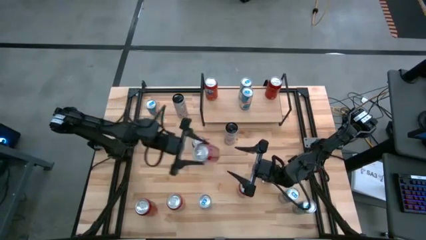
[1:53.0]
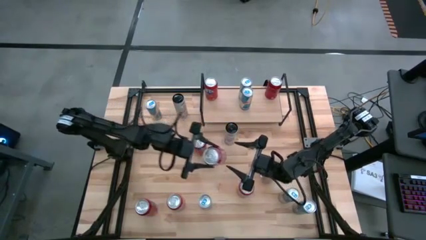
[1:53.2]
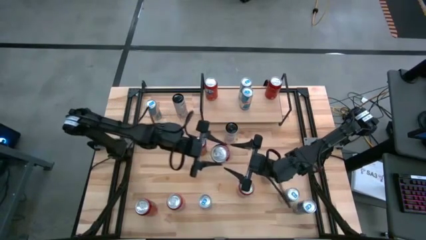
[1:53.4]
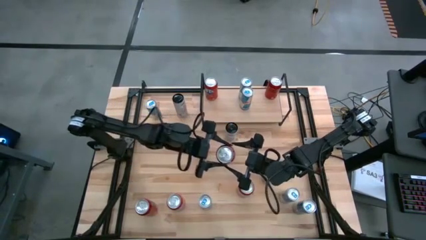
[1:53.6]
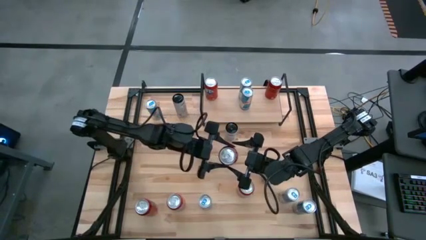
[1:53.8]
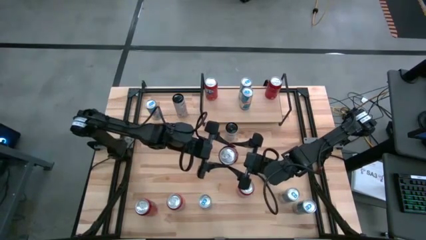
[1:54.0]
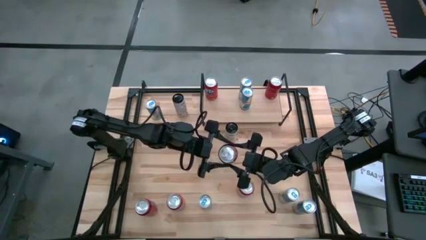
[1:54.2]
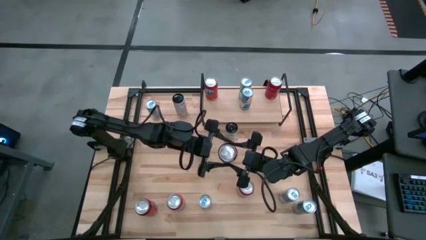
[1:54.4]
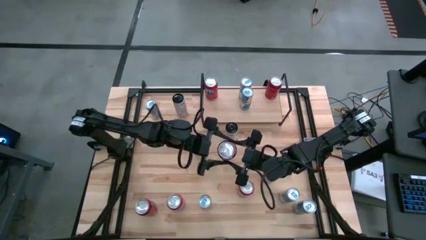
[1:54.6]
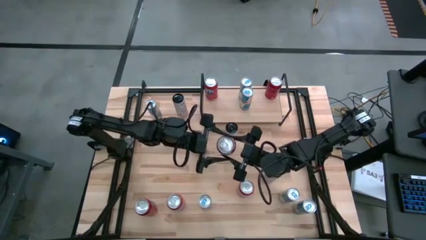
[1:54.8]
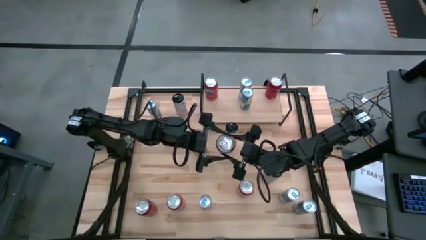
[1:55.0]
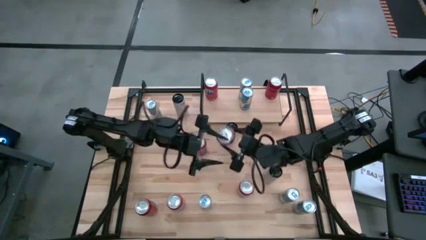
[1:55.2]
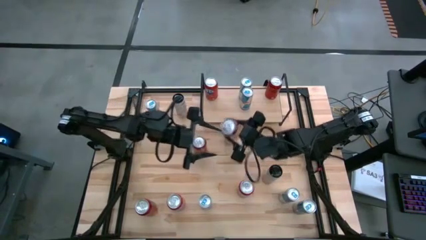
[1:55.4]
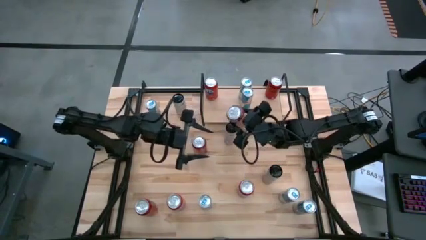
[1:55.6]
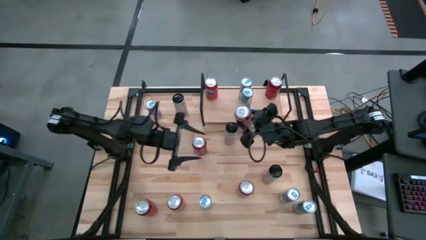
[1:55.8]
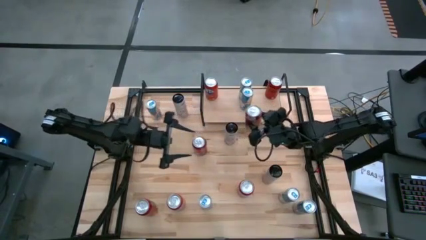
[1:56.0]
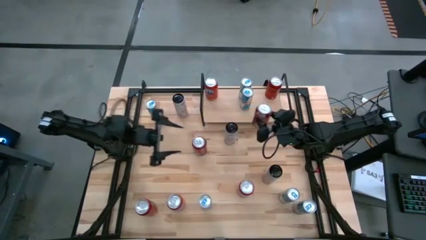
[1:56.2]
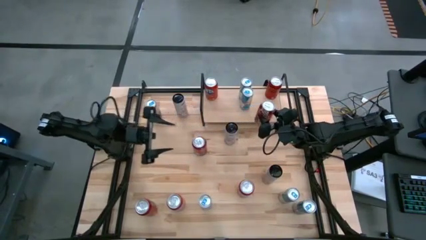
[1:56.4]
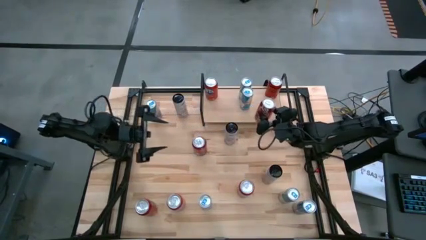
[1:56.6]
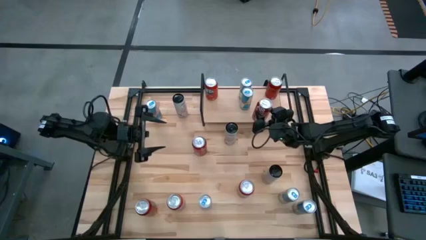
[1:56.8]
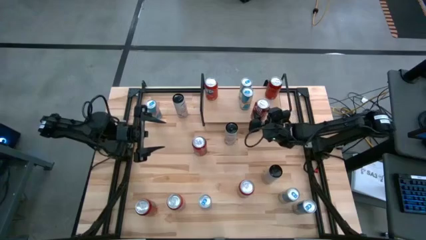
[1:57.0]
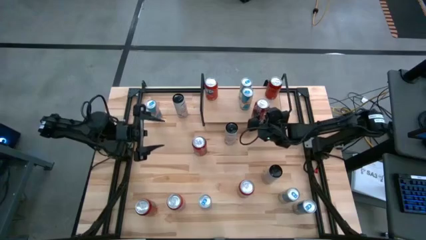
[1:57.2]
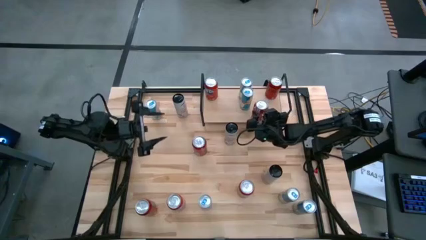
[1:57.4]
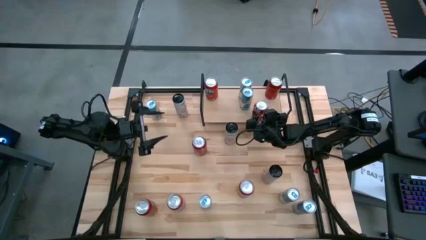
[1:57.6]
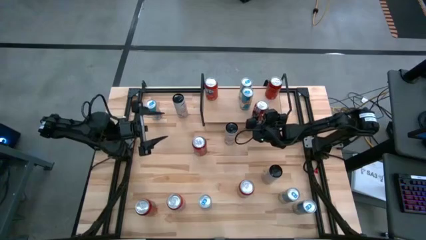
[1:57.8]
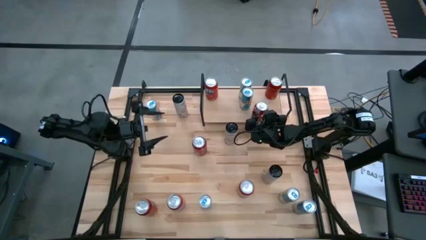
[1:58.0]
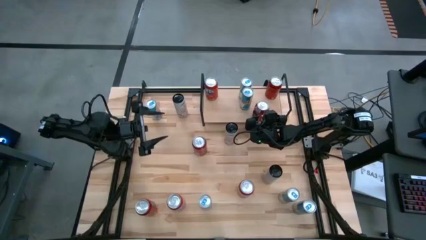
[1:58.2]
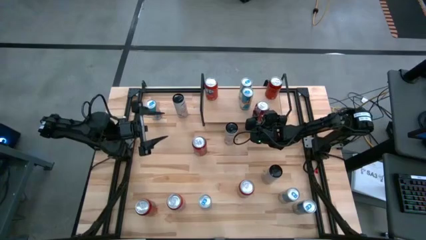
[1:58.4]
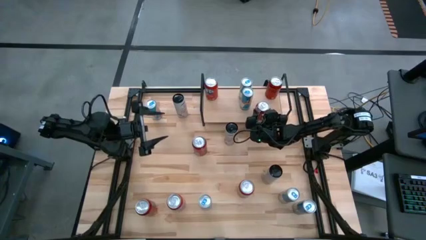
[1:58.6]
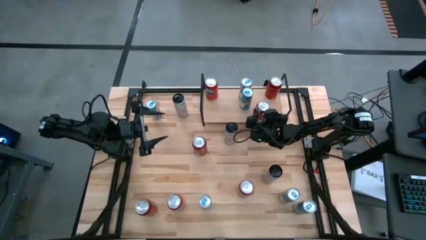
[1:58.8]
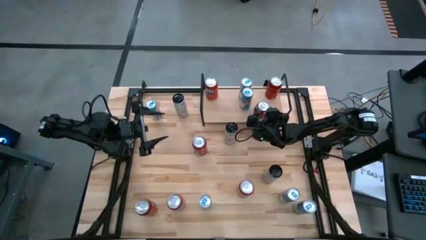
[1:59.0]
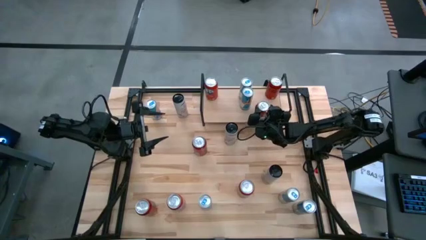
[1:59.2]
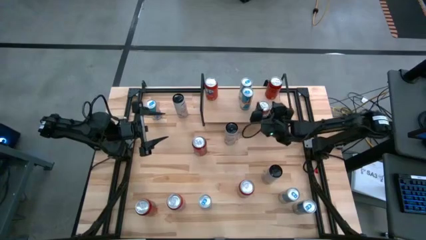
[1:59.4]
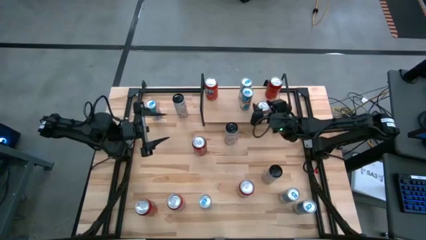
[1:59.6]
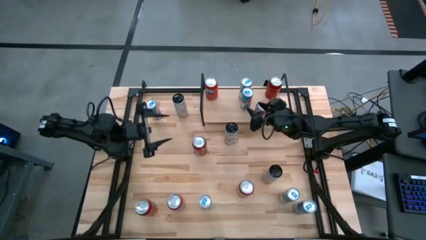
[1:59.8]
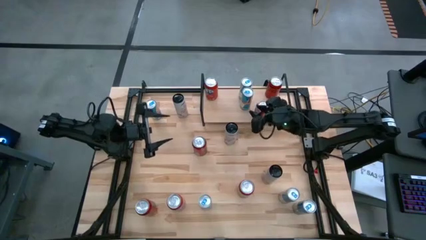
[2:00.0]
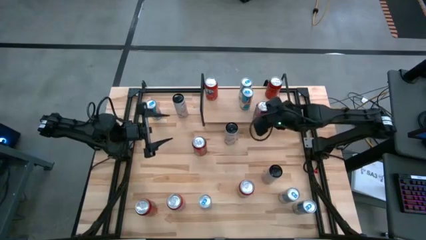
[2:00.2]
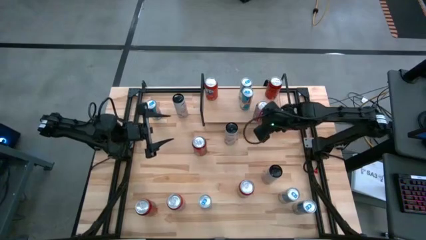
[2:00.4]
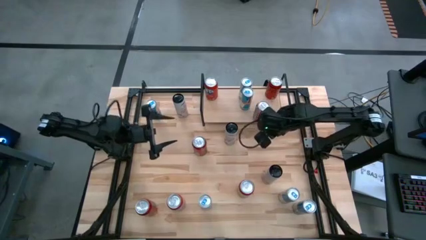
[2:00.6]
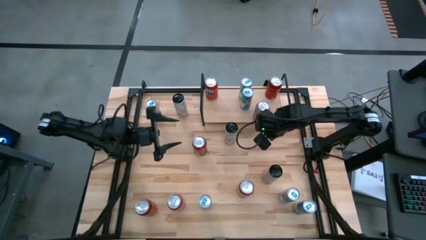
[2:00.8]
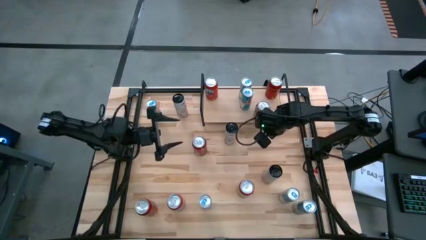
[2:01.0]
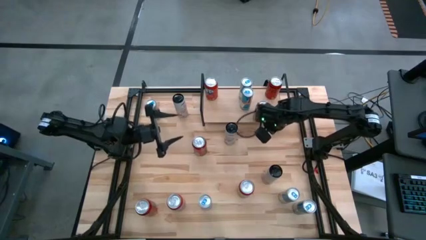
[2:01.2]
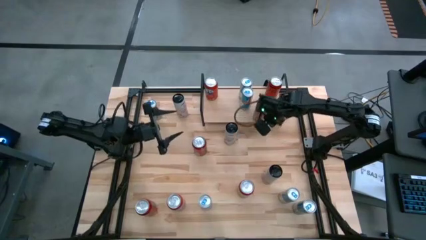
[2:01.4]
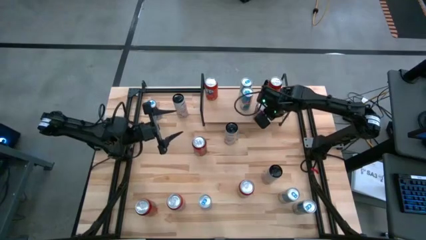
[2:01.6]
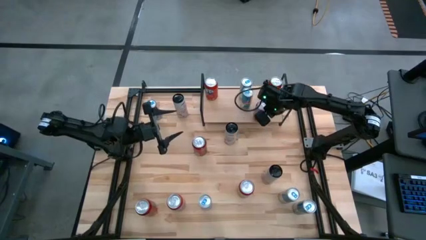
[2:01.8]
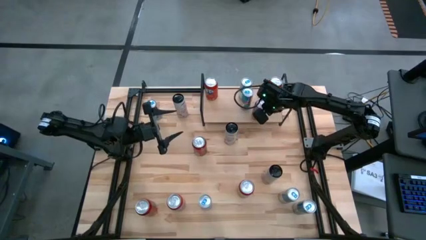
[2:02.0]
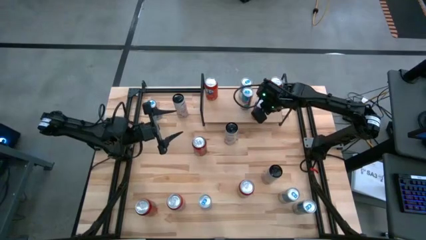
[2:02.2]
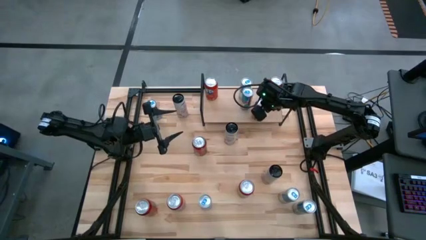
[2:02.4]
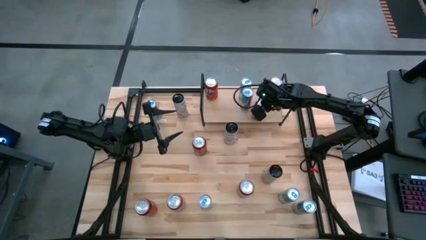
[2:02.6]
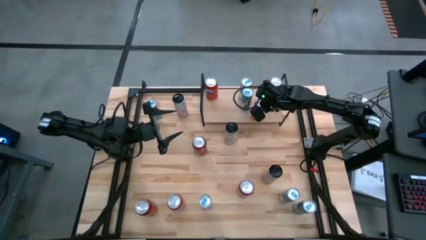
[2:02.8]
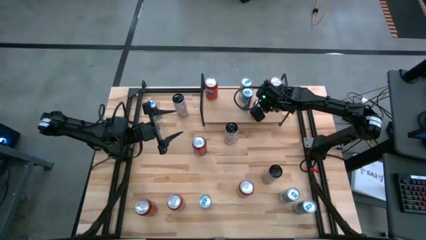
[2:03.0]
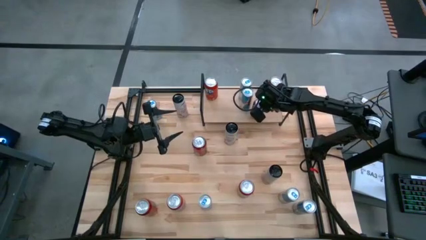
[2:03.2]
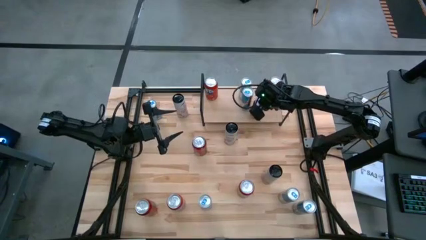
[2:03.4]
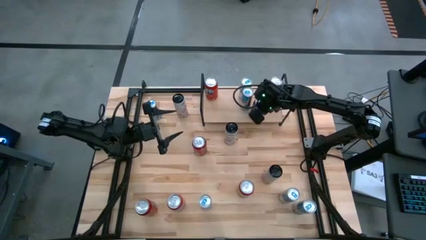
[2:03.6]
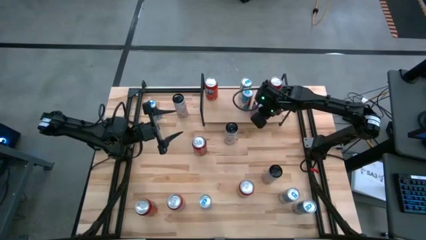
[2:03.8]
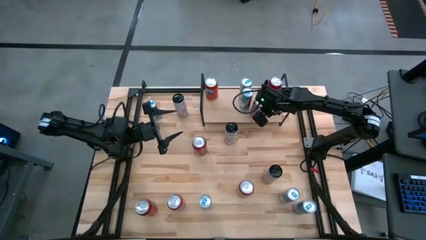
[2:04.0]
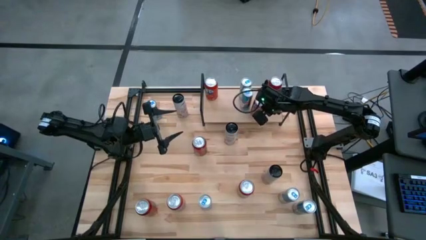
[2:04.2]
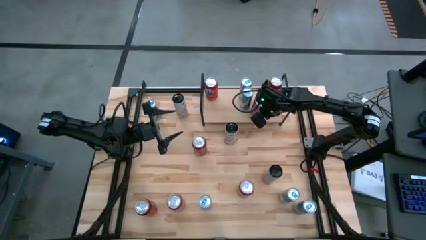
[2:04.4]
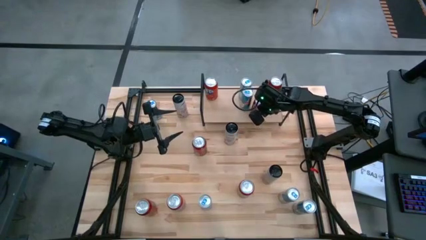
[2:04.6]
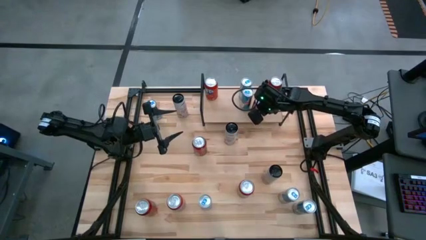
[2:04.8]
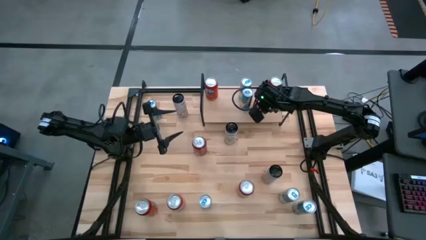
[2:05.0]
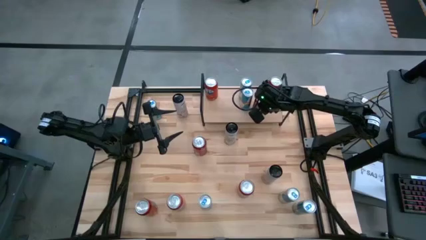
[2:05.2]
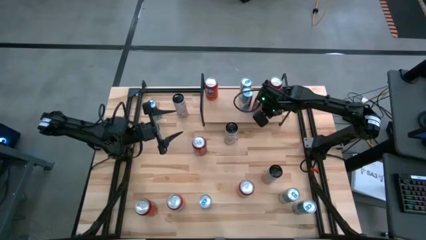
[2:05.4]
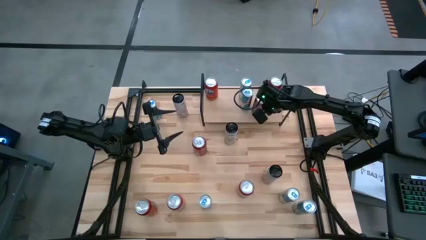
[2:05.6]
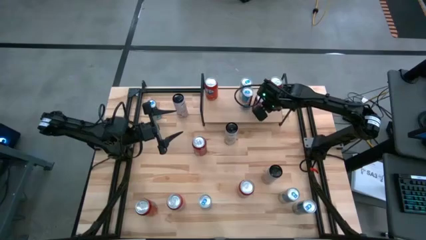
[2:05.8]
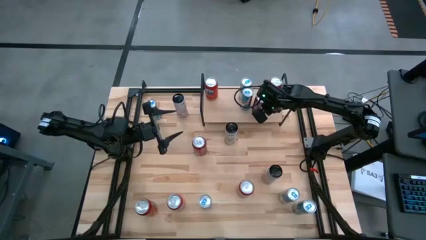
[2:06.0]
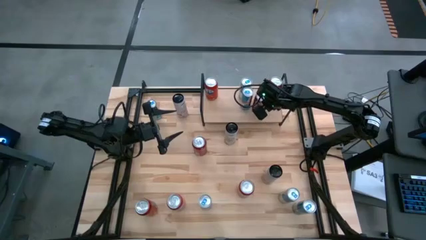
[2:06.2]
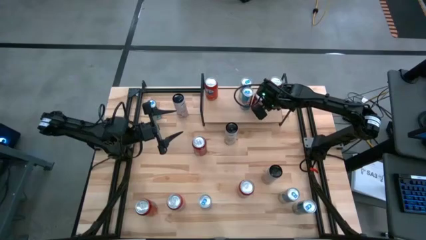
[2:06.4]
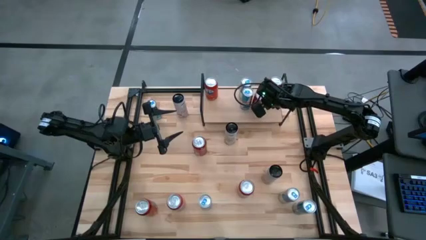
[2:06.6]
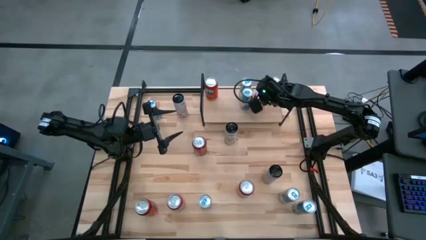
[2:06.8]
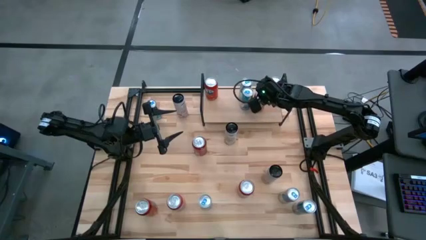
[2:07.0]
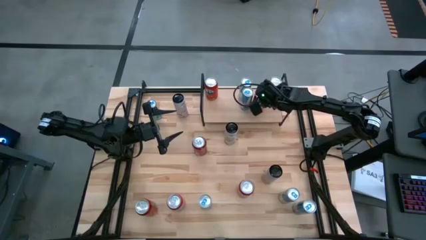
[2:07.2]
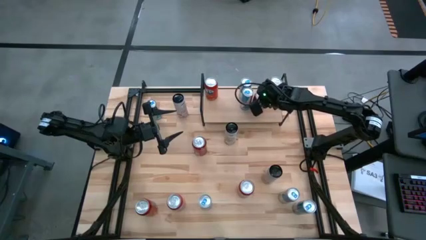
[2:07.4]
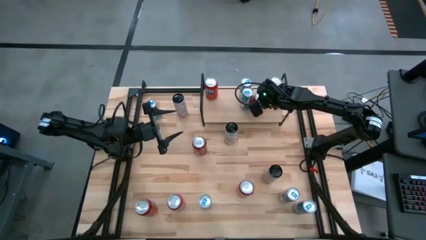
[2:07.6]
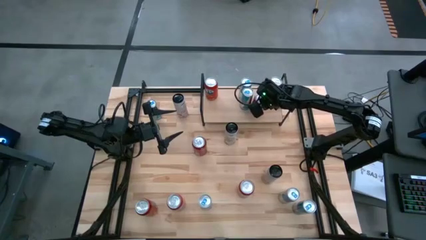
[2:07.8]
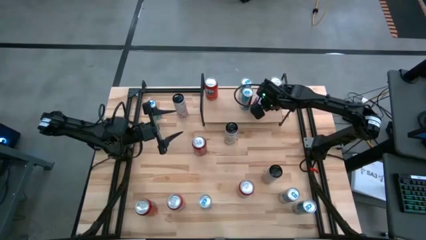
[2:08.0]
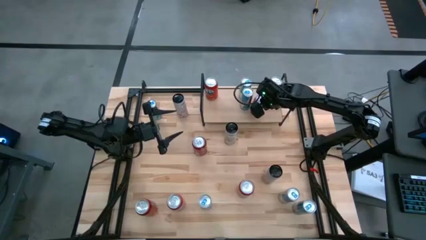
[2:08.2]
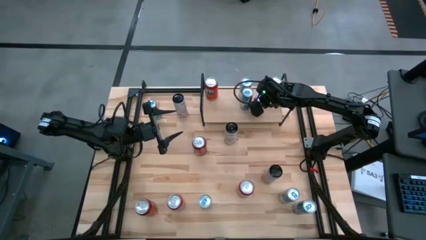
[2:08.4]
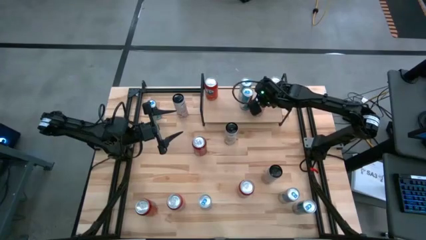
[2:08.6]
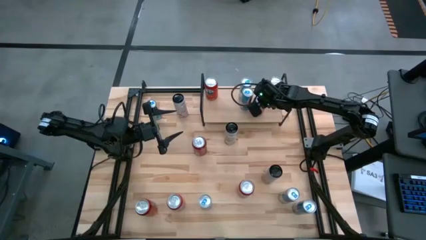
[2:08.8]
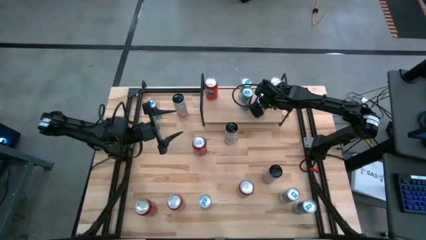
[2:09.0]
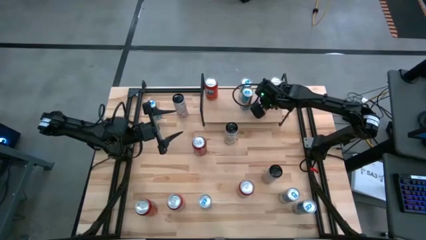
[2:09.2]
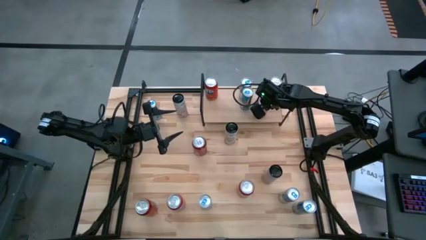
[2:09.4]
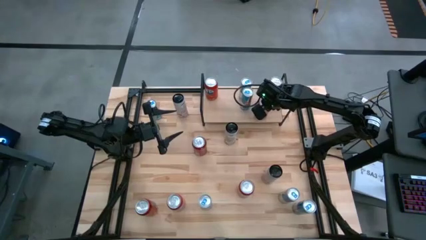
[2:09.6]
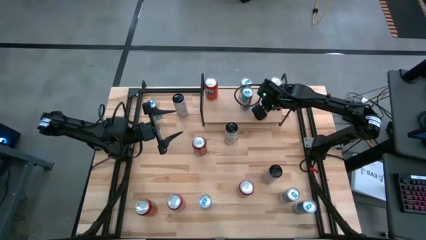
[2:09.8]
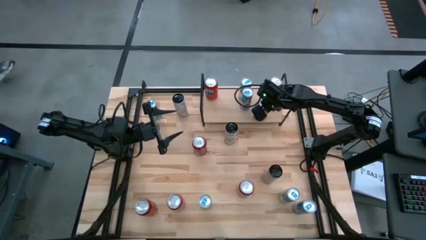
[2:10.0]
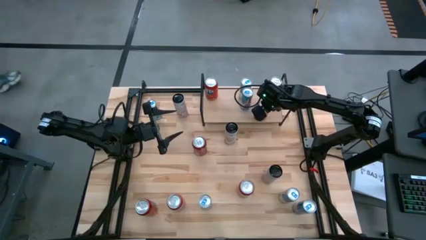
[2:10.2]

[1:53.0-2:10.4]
Task: Place canned beverage on shelf
Put the red soda can on the shelf
